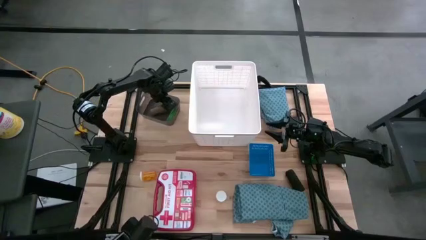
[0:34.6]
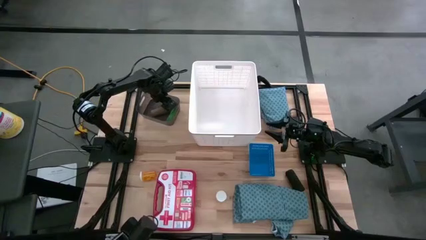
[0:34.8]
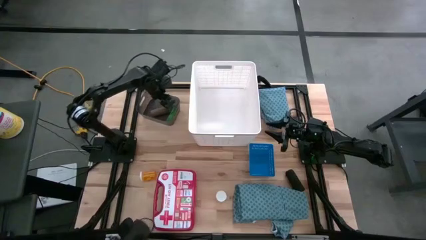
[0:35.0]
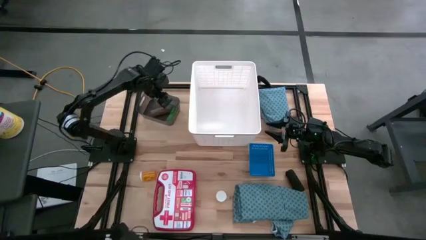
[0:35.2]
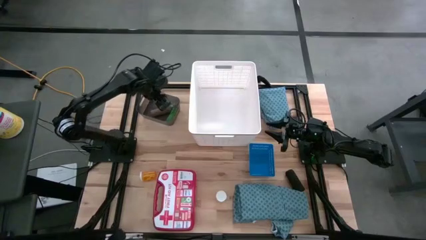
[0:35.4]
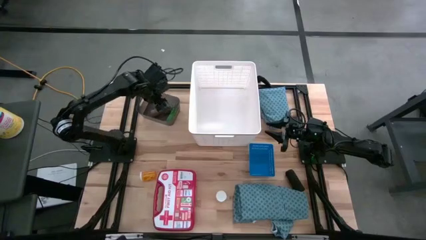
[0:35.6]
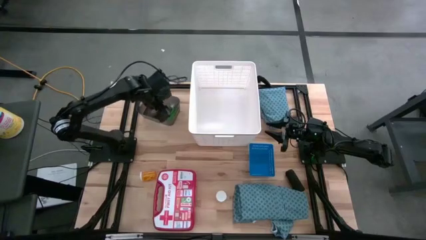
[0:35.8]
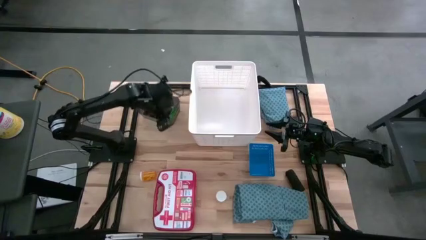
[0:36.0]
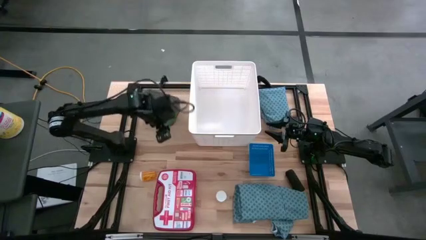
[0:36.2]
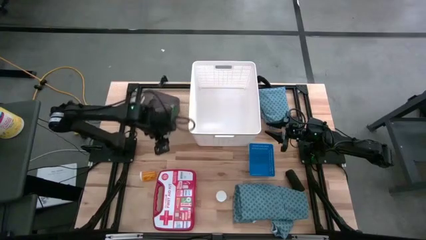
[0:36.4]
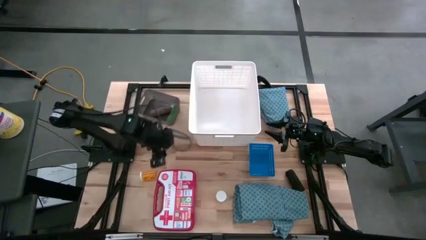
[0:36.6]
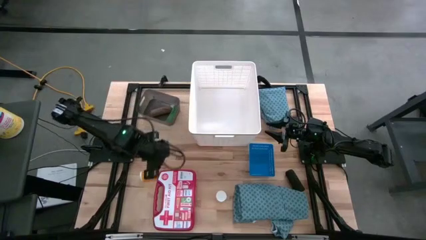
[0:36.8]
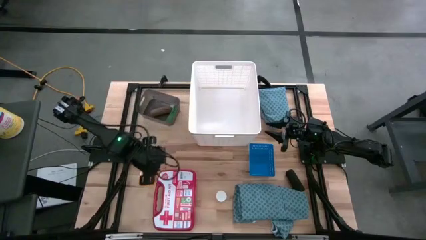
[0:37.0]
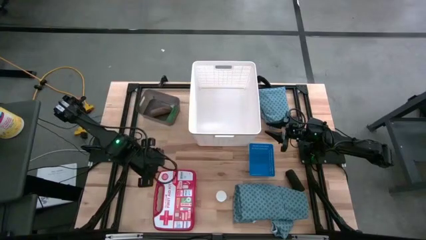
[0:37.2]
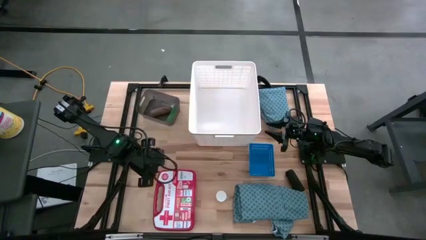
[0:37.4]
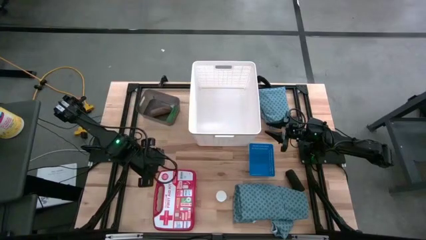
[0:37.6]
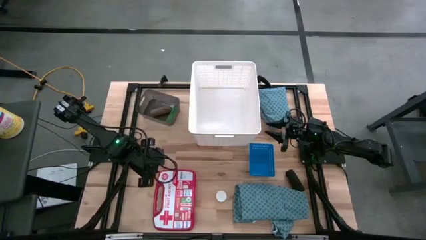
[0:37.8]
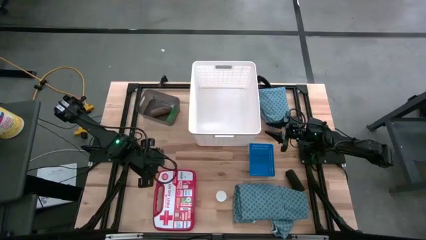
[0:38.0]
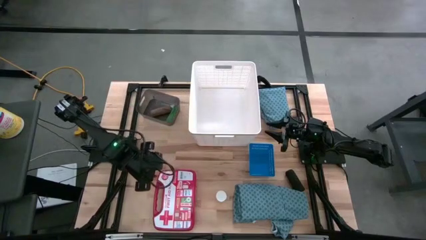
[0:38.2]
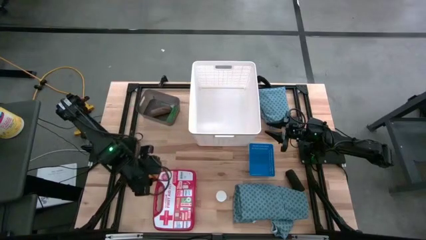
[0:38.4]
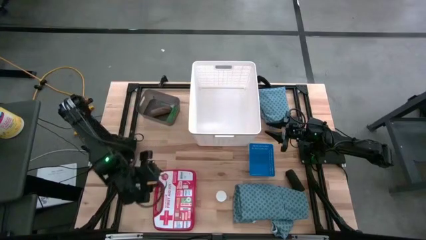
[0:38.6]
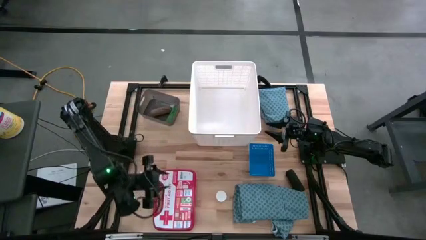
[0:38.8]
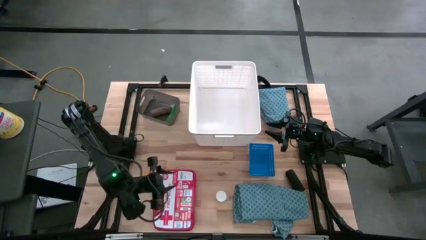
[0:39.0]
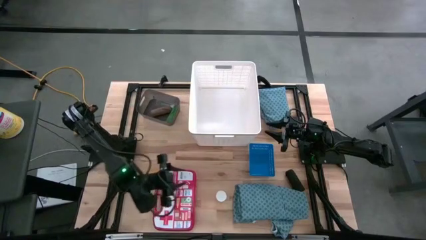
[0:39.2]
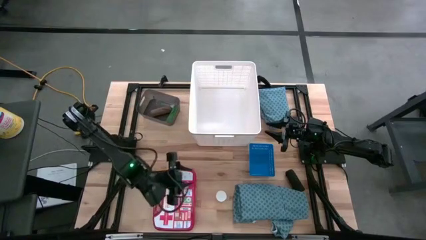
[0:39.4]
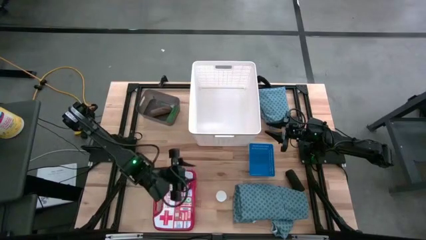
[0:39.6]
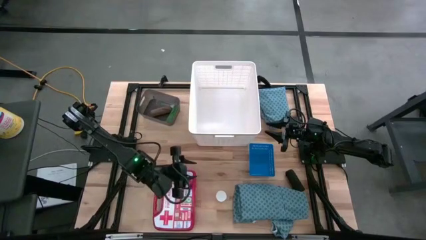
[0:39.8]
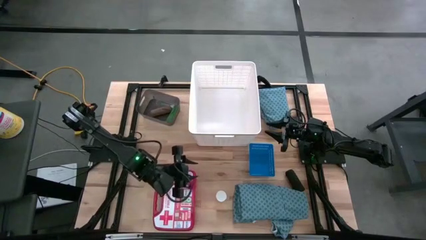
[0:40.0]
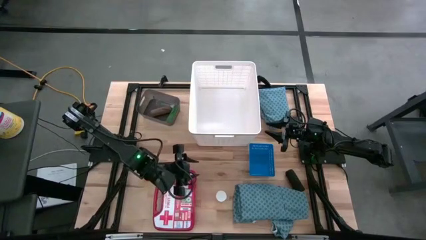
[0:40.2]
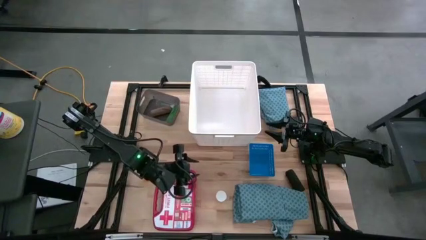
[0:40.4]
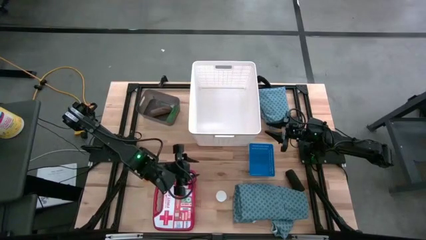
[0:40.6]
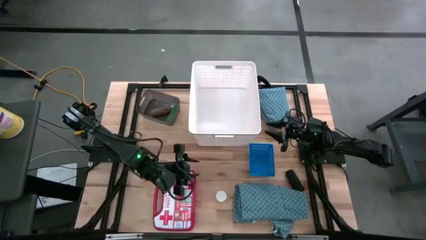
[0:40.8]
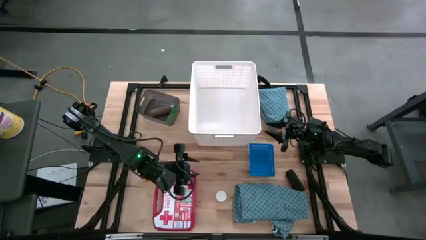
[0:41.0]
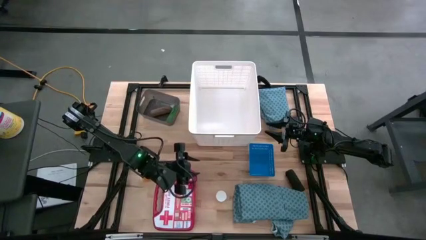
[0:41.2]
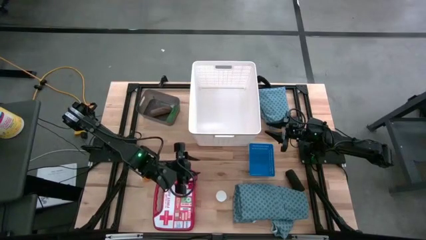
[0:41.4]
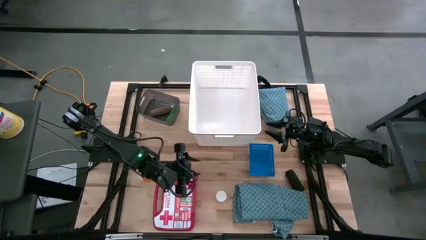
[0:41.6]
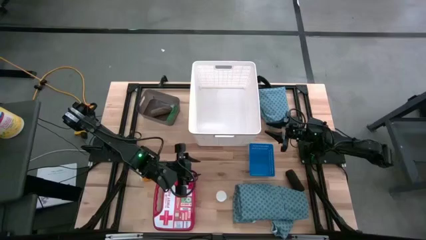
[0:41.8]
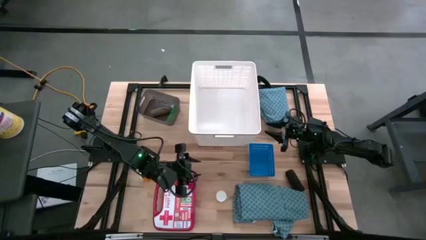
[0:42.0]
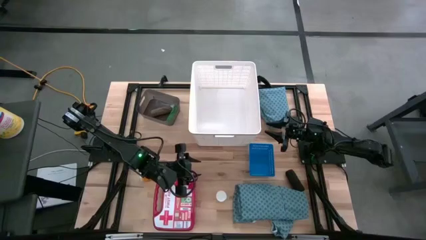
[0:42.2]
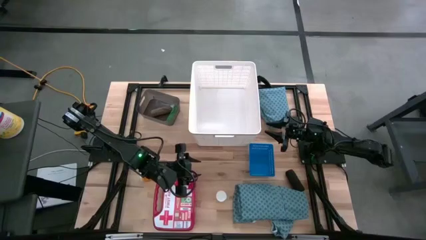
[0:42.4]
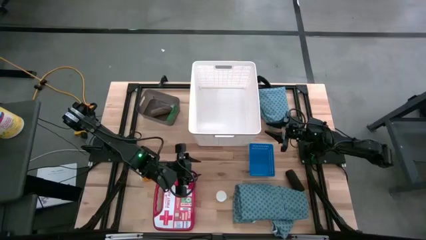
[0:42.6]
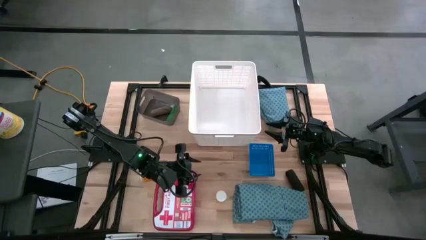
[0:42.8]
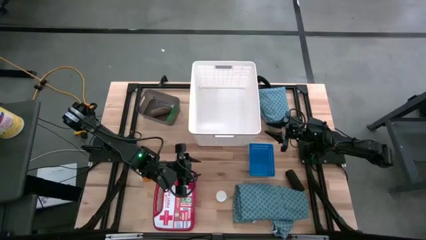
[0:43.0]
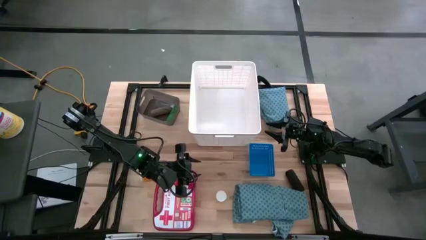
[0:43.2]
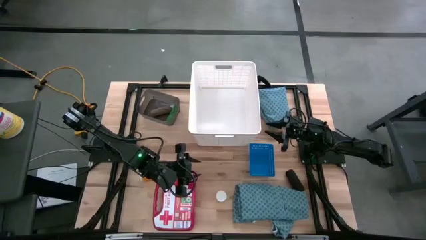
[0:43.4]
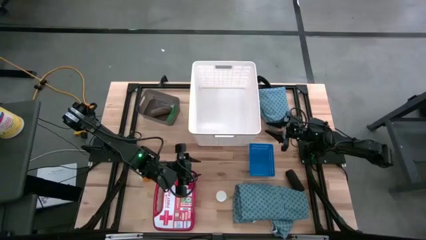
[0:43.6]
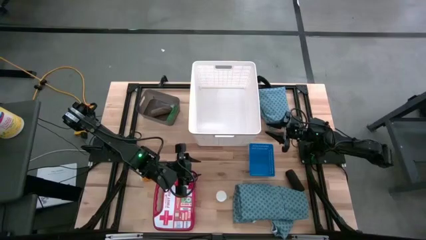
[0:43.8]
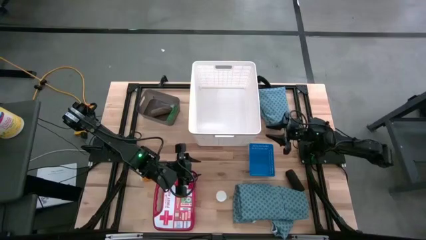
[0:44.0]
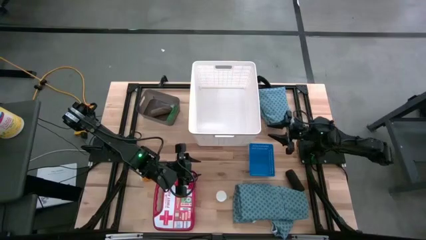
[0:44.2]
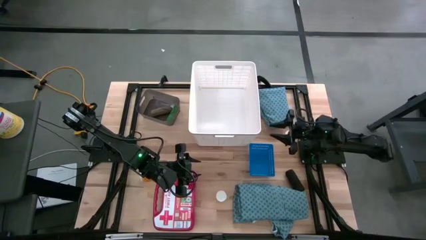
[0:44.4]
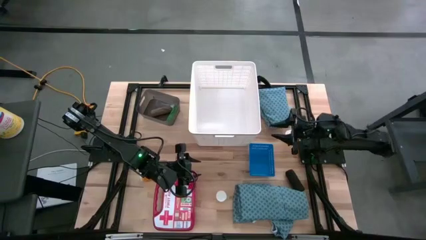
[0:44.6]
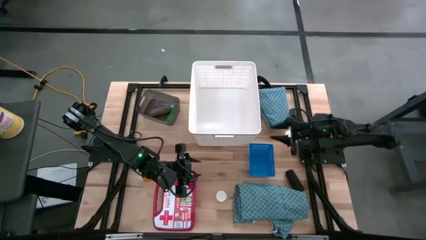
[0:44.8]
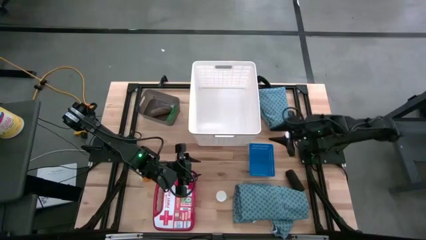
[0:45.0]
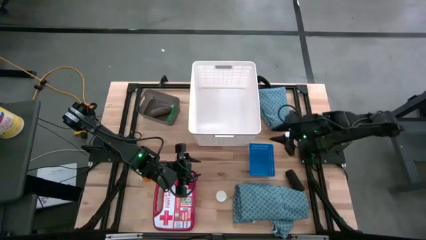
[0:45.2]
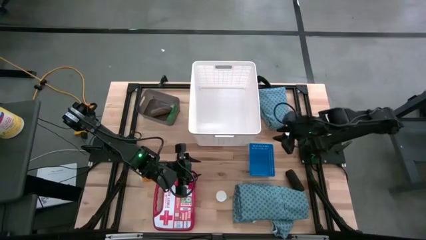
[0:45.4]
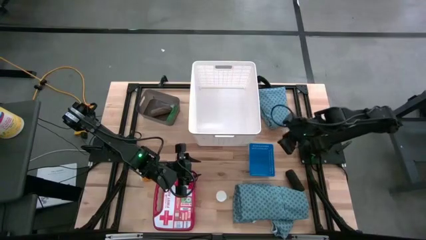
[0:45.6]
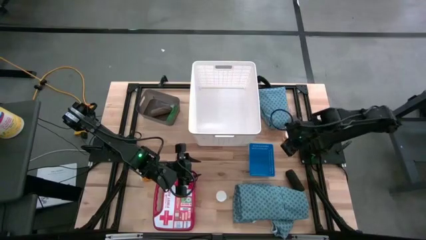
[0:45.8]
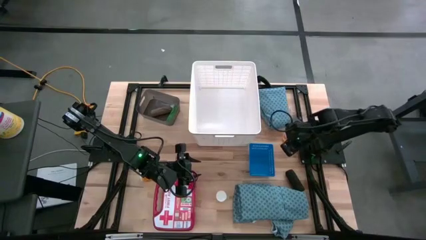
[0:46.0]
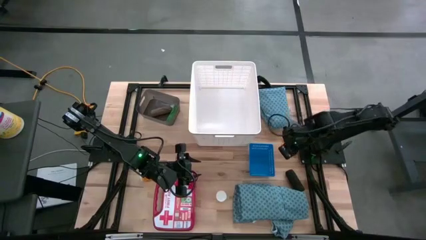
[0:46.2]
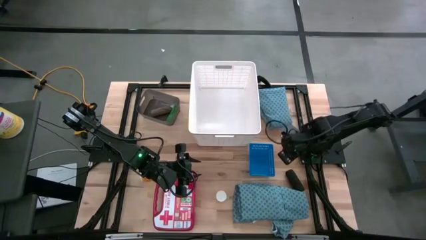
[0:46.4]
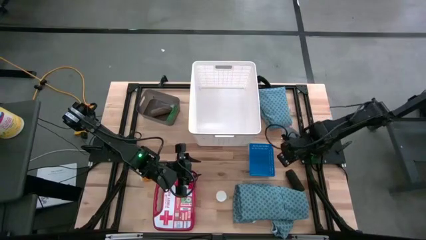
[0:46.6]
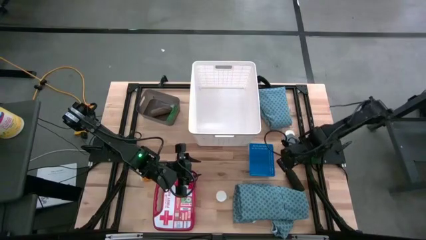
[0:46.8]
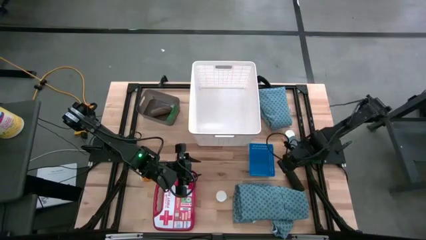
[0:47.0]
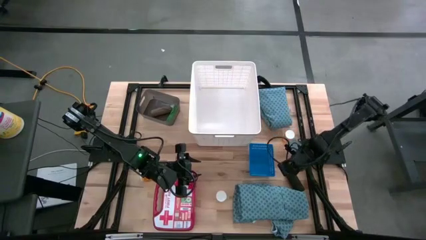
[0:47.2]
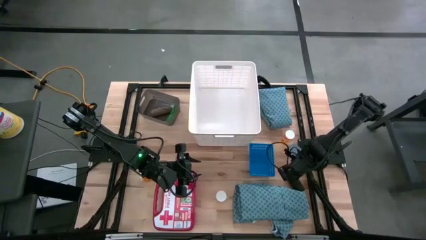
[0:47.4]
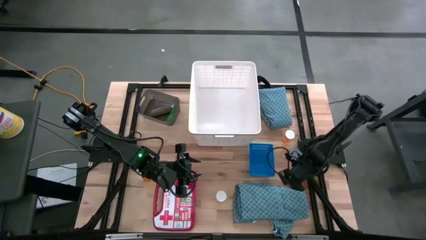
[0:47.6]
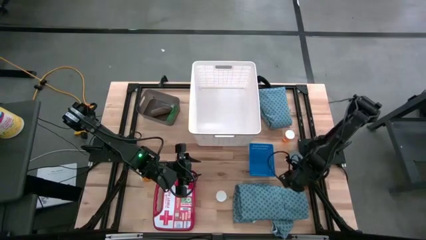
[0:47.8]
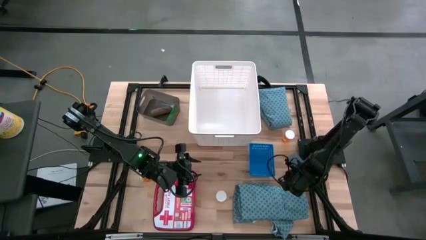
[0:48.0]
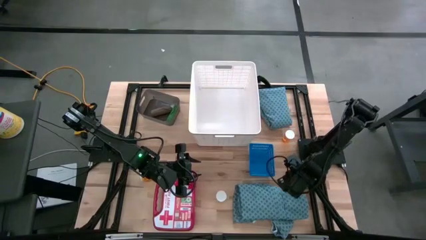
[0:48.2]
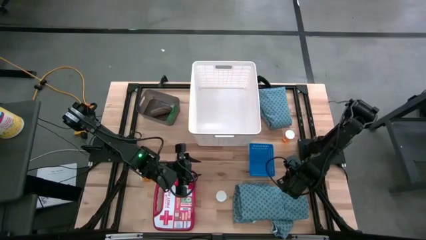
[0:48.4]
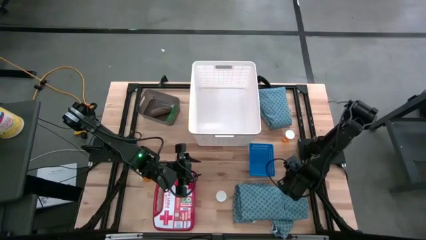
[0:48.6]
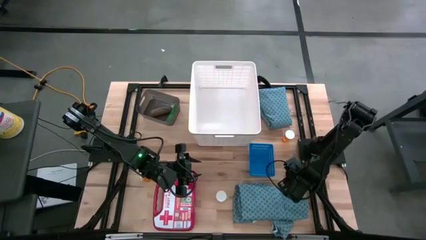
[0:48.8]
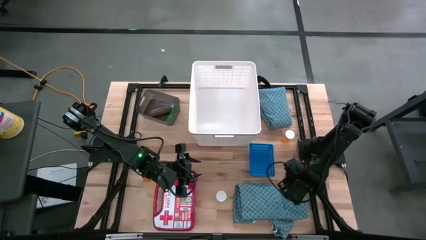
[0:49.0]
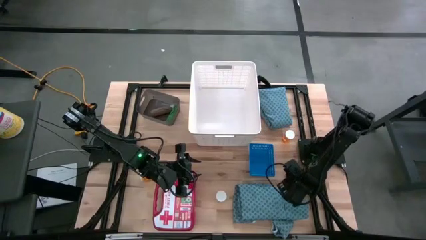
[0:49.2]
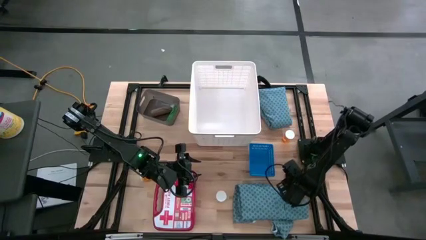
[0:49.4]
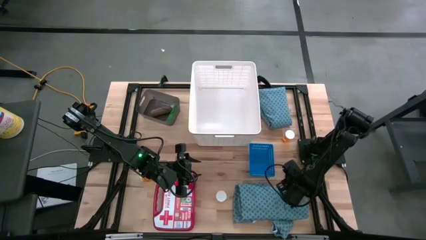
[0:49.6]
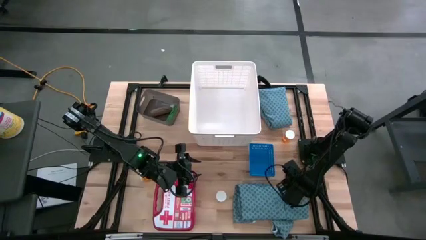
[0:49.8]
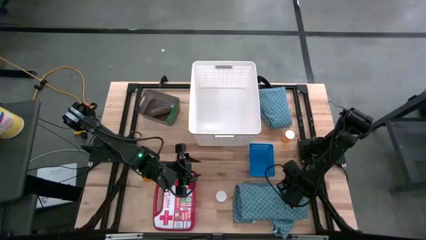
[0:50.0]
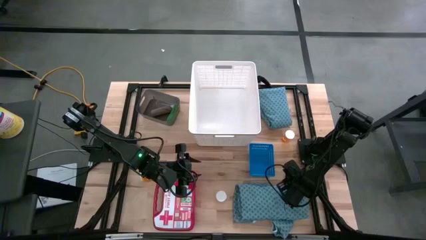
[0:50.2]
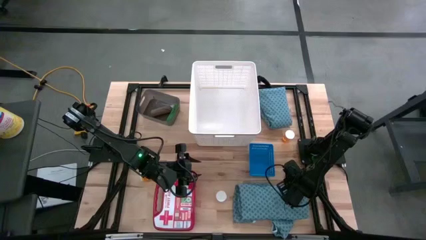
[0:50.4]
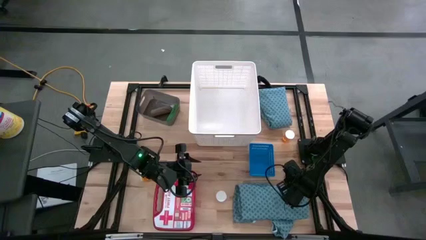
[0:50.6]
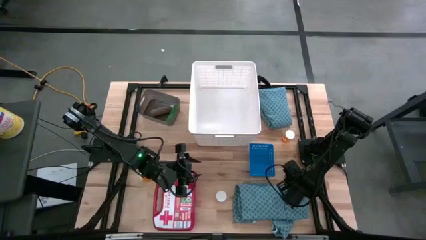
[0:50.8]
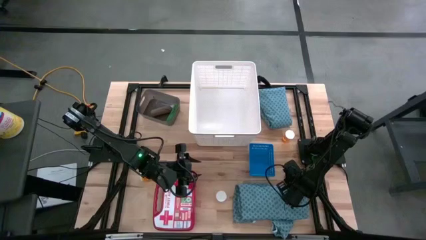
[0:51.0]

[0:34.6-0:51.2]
Task: Pick & place medical supplies in basket/bin
Put the black bandage into the black bin
